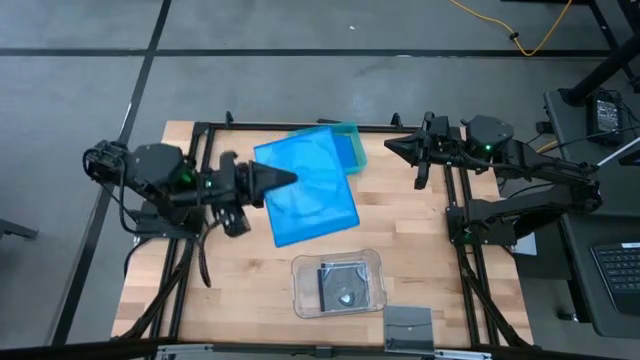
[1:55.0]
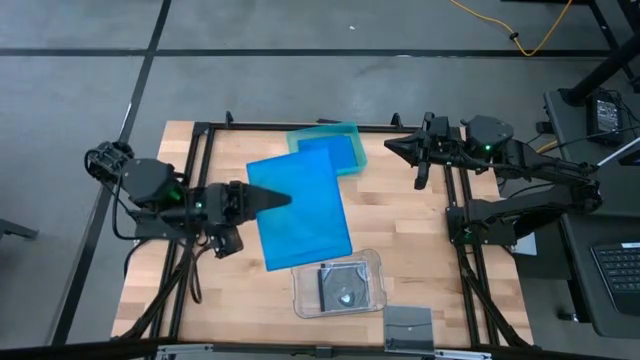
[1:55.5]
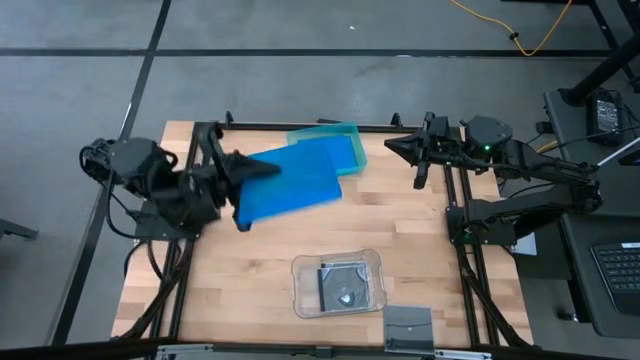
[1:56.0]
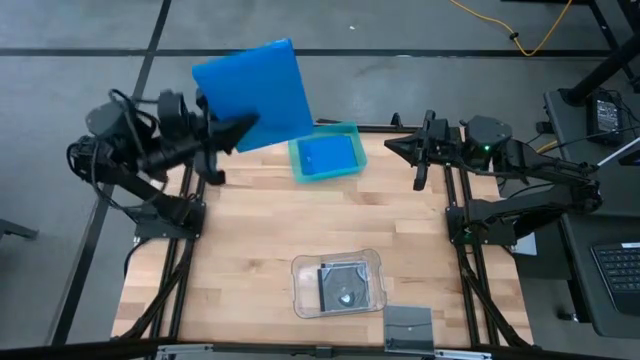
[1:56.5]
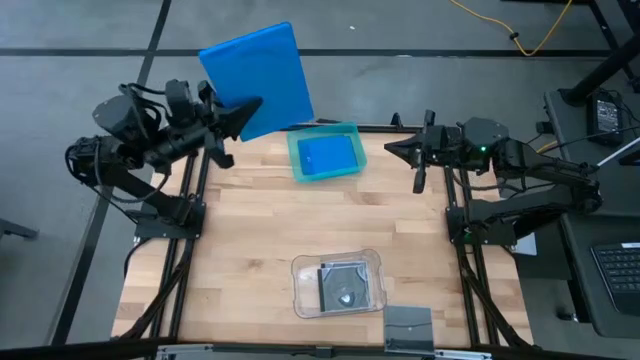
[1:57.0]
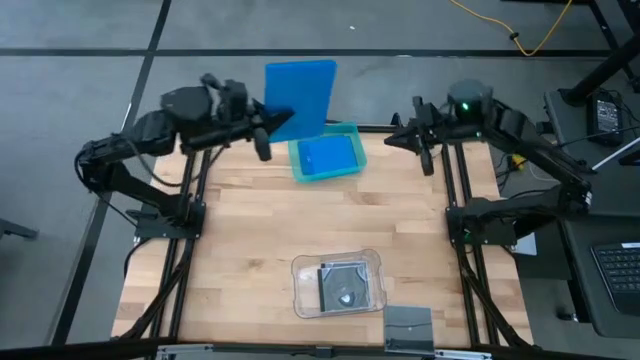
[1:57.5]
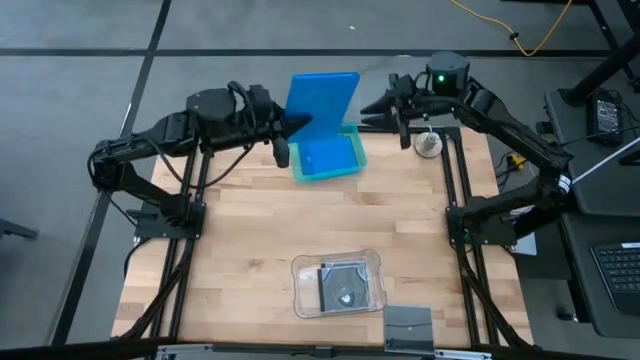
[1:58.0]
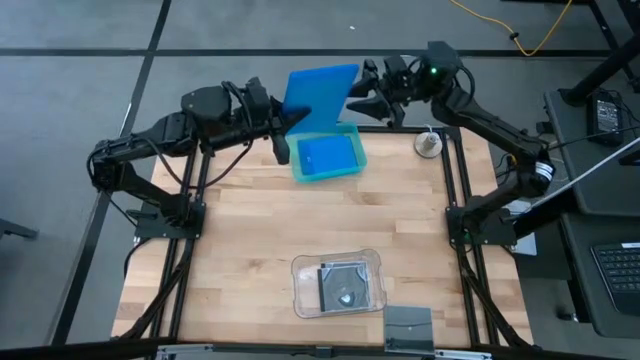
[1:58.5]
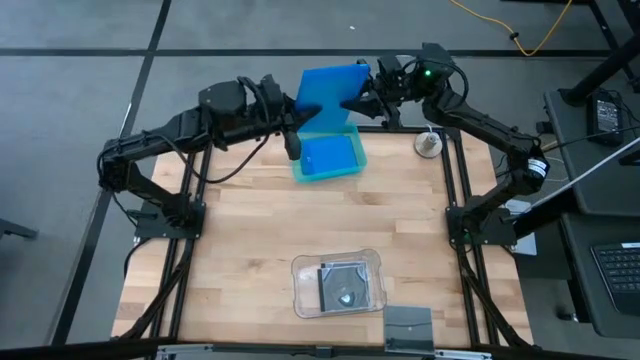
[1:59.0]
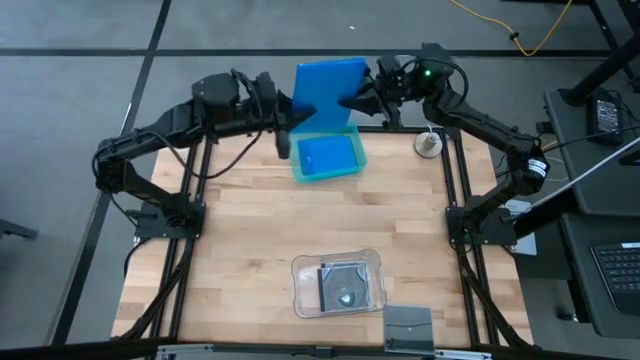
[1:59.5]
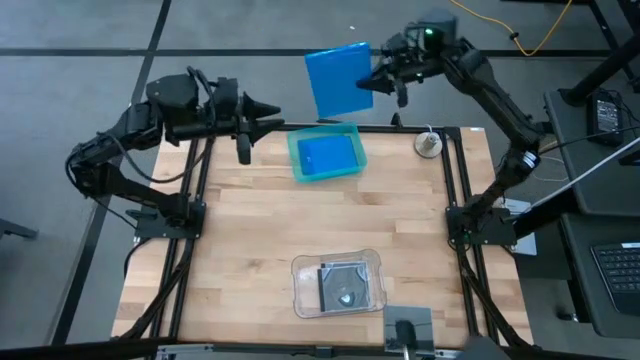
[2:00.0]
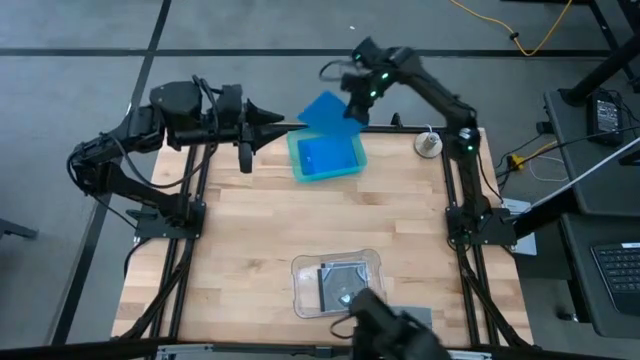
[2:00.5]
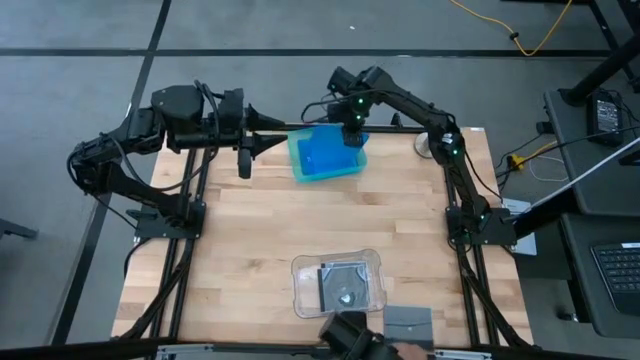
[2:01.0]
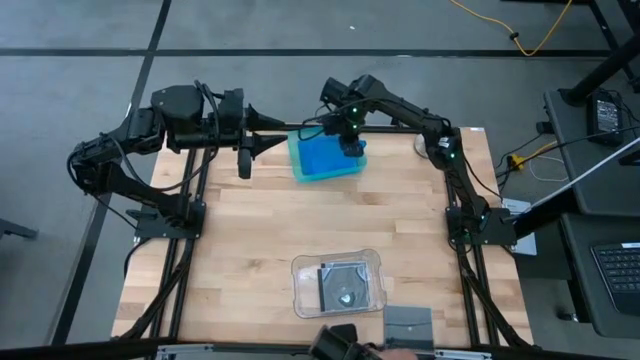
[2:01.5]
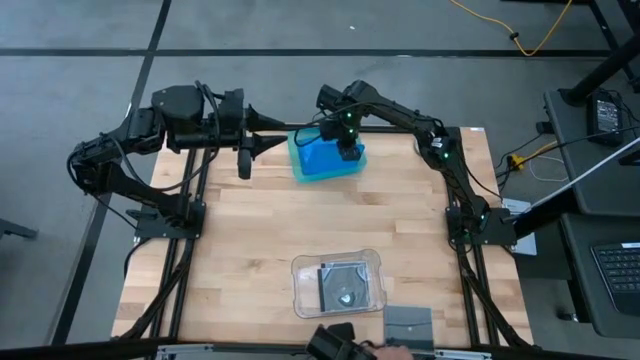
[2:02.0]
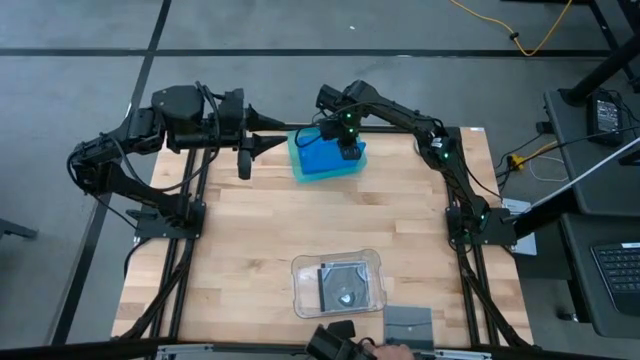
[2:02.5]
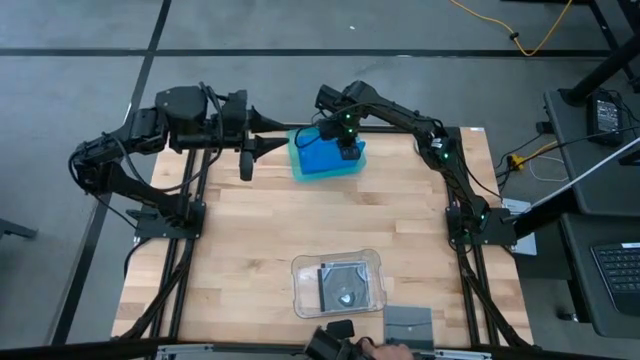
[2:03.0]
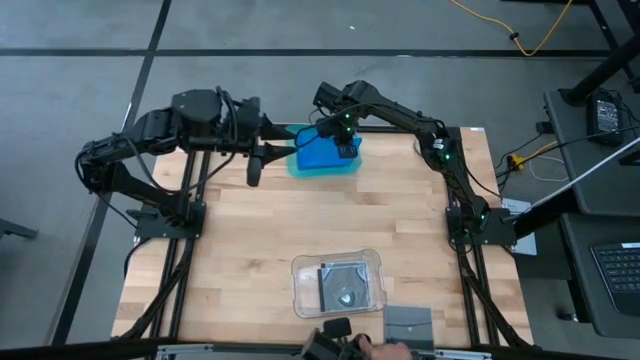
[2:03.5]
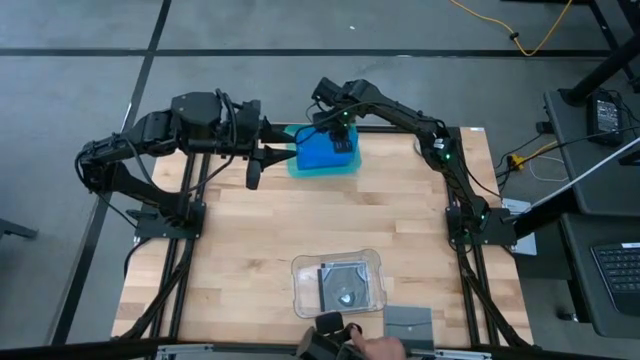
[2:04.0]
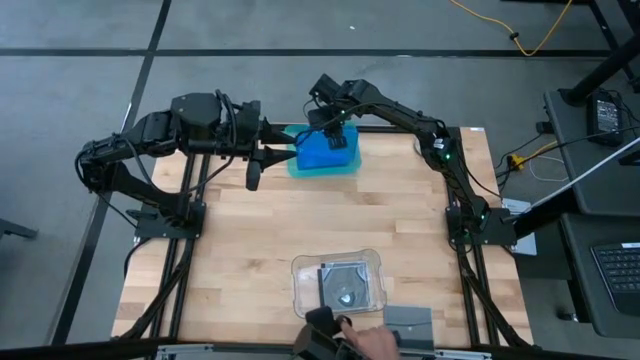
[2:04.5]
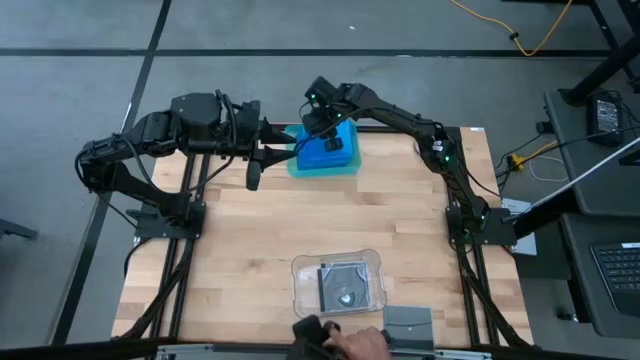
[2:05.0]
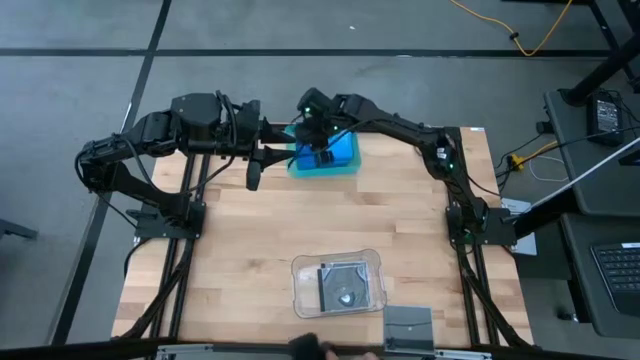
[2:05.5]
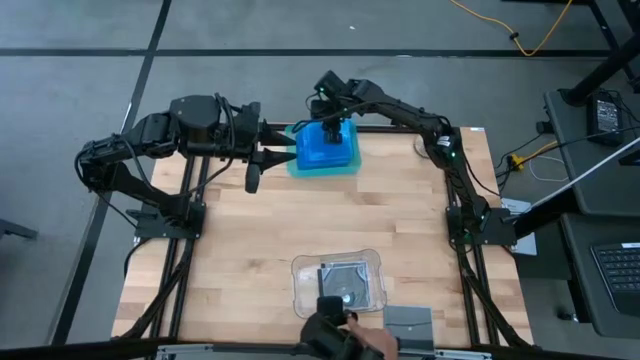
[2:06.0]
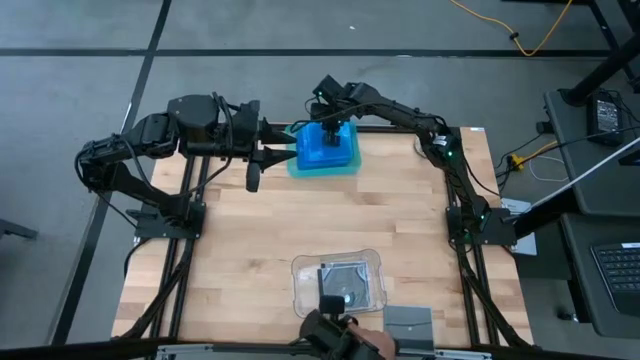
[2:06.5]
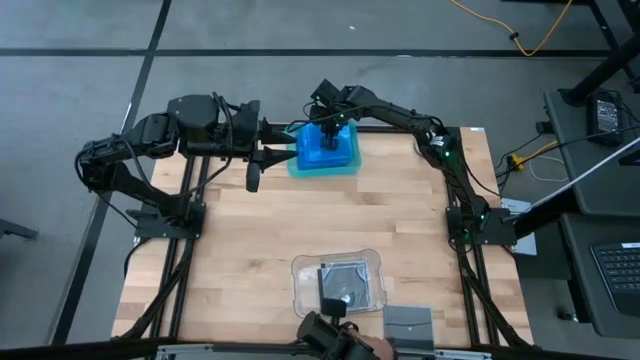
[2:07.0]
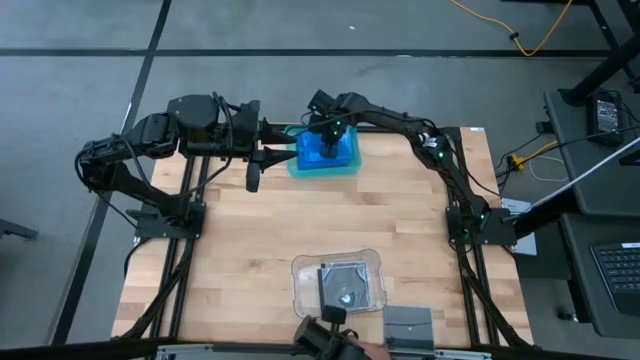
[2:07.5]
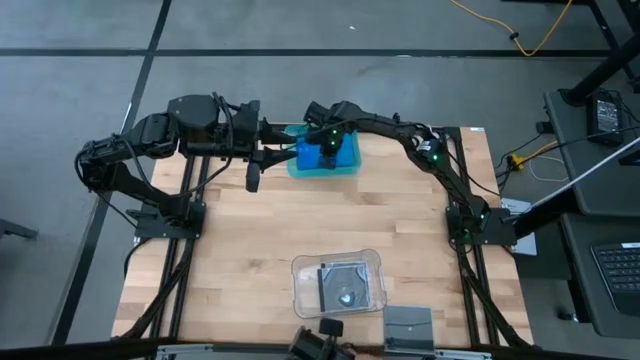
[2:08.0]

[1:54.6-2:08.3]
Task: Pick & place jewel cases by type
Put the blue CD case into the green bin

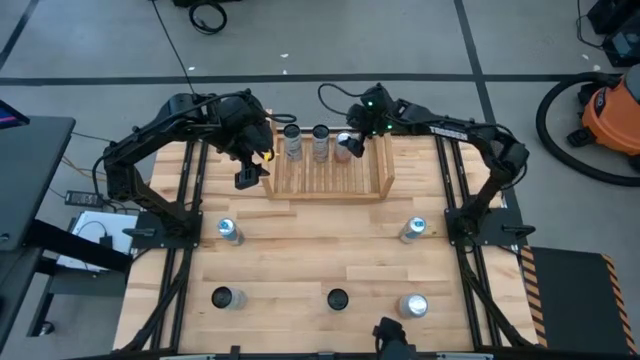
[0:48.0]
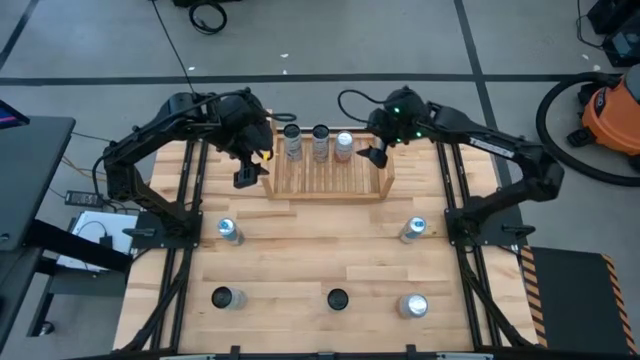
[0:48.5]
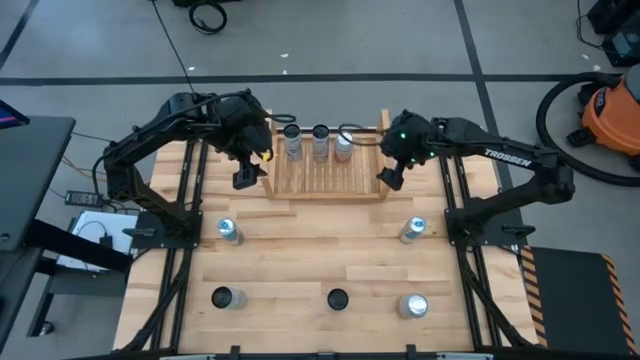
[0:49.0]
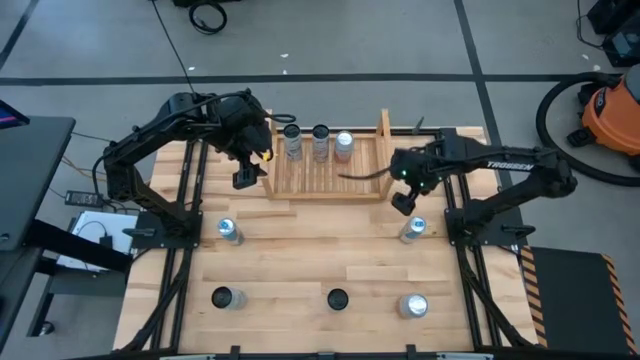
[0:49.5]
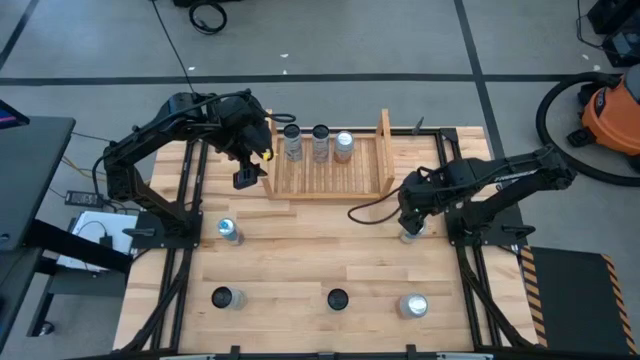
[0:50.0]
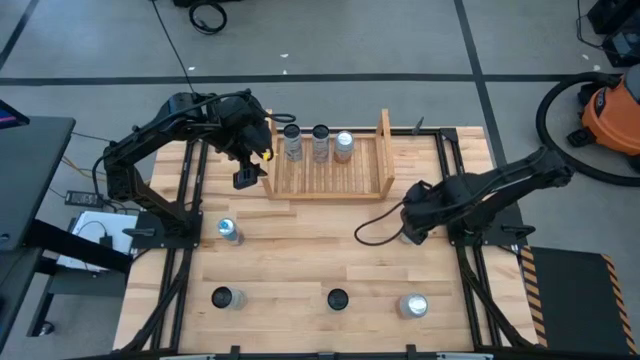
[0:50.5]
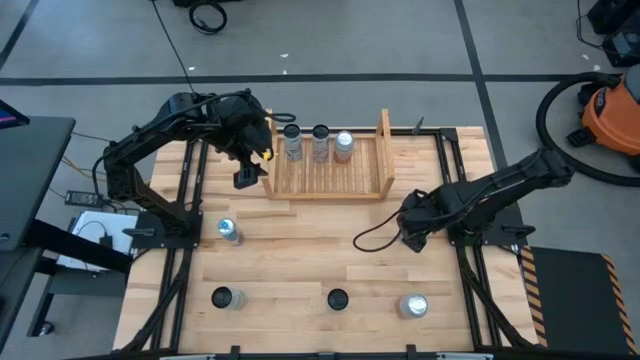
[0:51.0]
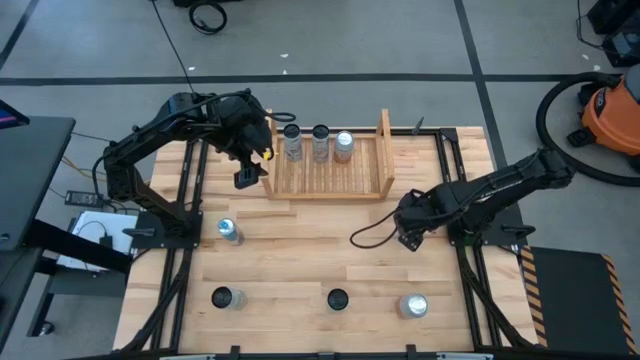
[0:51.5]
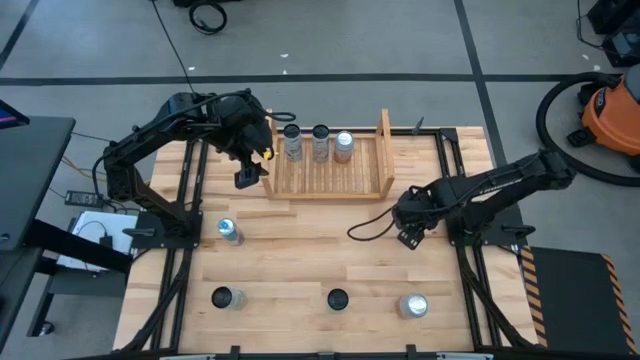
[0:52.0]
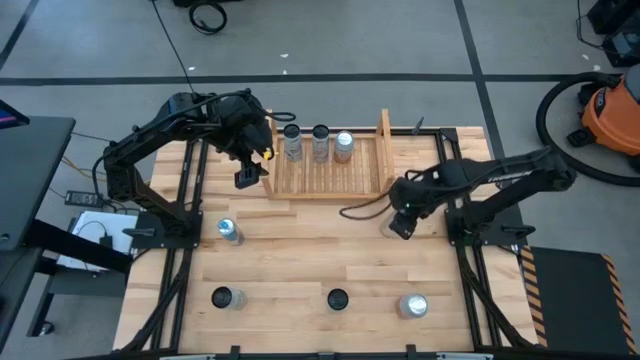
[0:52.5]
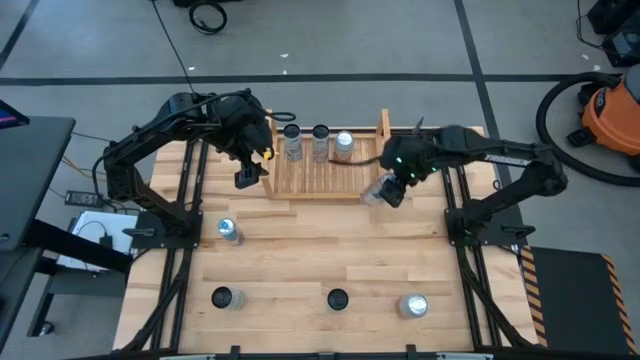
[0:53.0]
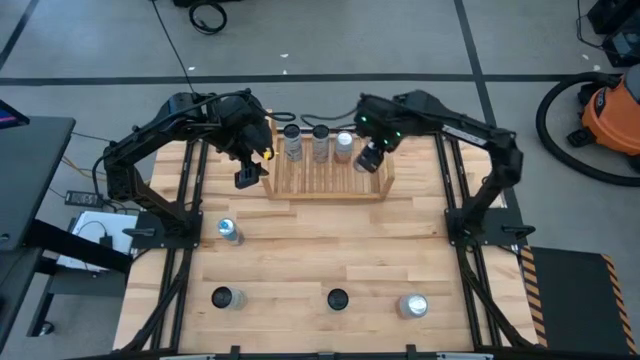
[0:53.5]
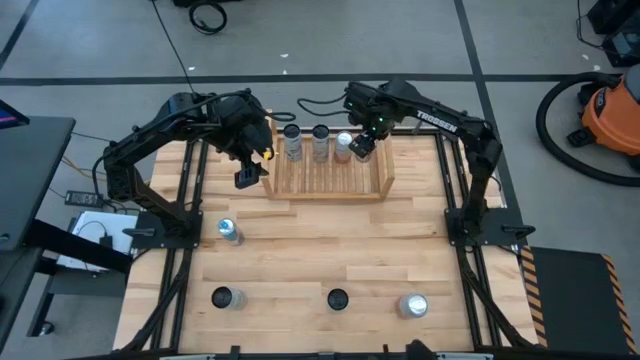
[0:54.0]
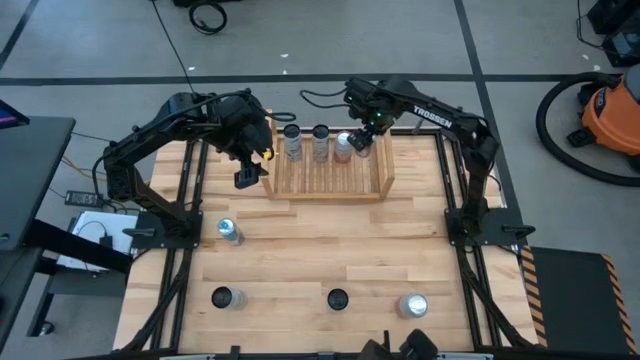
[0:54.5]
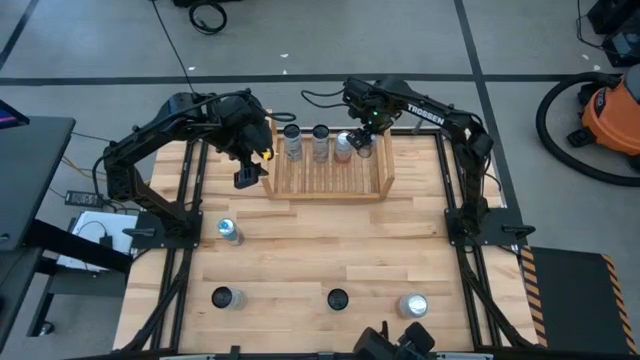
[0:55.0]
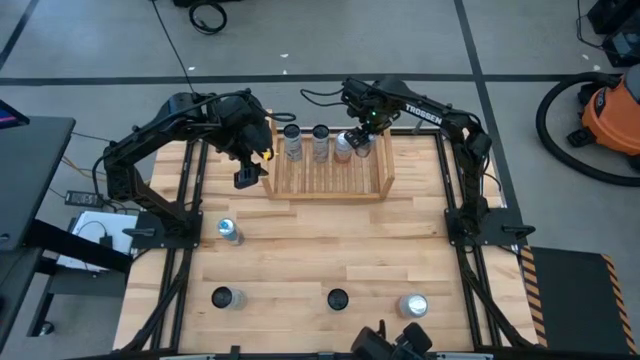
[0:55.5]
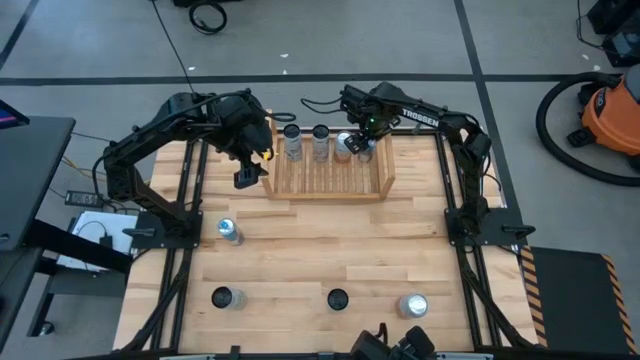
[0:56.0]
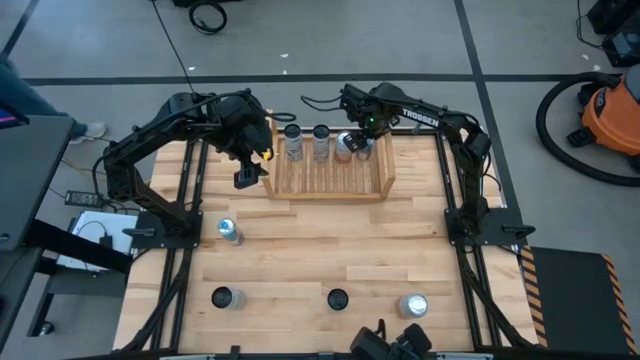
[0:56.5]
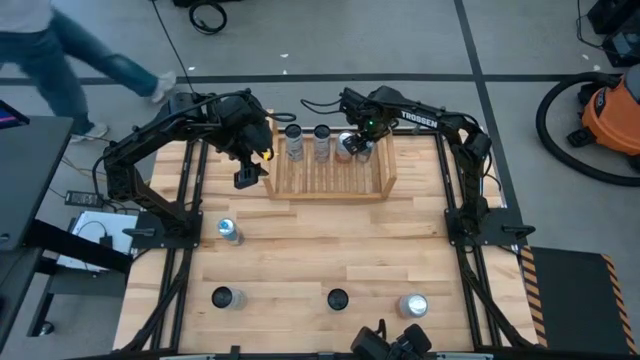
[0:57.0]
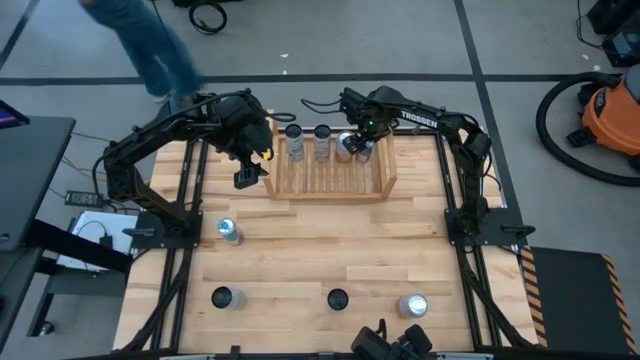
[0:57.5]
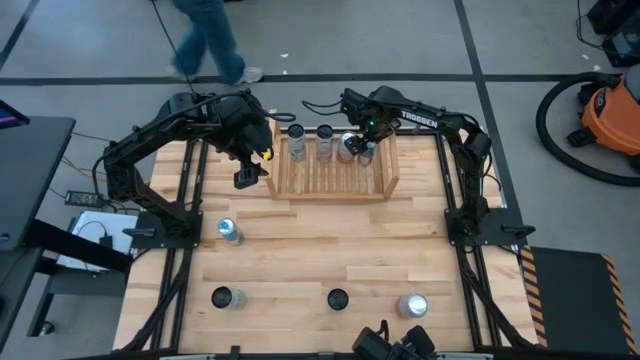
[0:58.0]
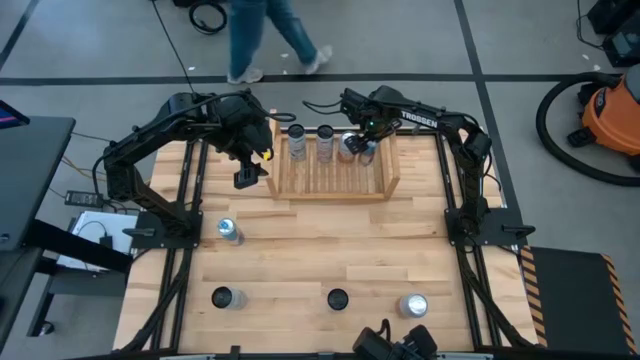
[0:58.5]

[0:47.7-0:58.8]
Task: Place canned beverage on shelf
Put the right blue soda can into the shelf
